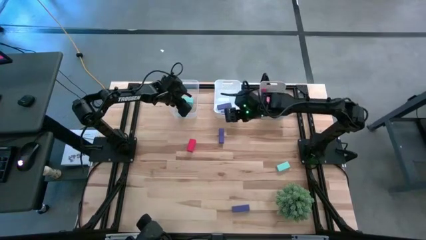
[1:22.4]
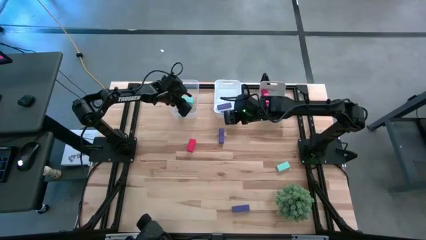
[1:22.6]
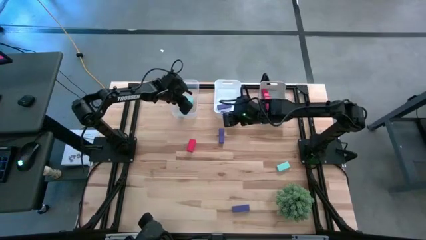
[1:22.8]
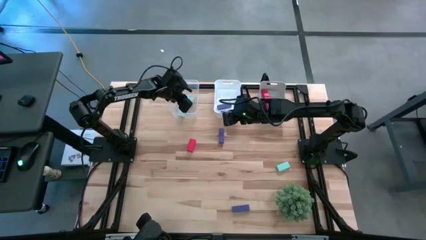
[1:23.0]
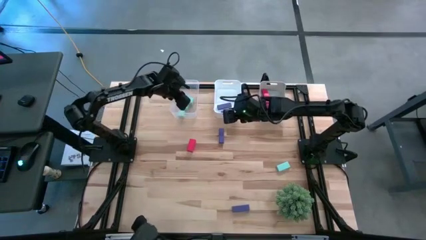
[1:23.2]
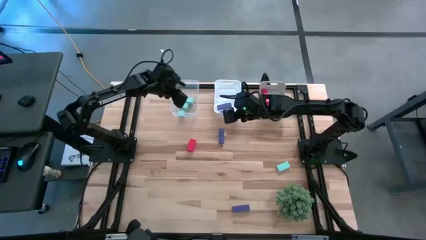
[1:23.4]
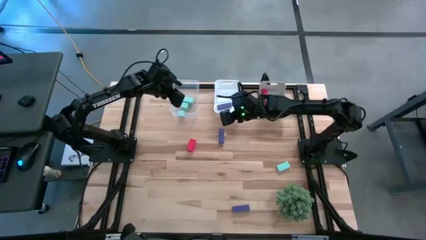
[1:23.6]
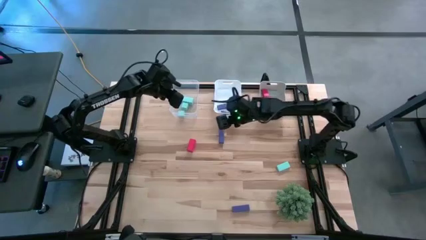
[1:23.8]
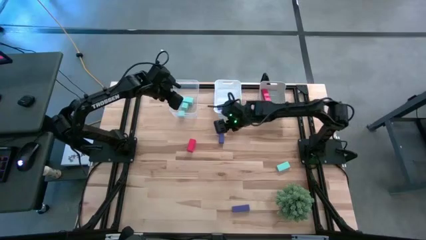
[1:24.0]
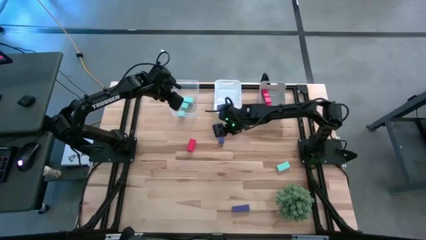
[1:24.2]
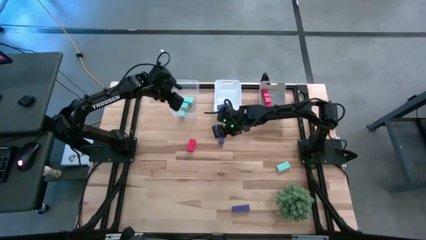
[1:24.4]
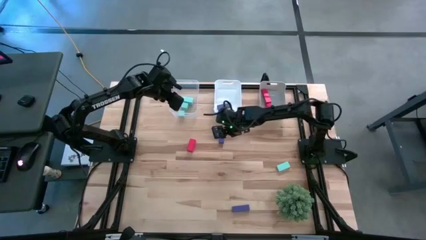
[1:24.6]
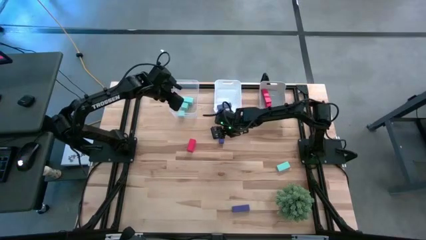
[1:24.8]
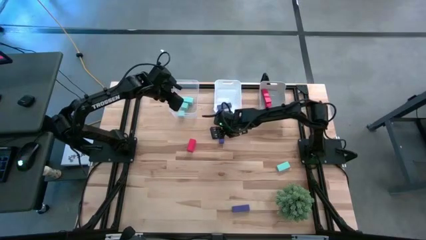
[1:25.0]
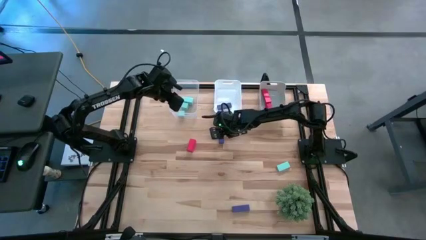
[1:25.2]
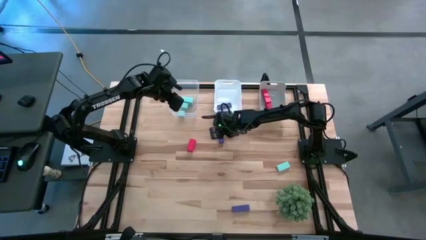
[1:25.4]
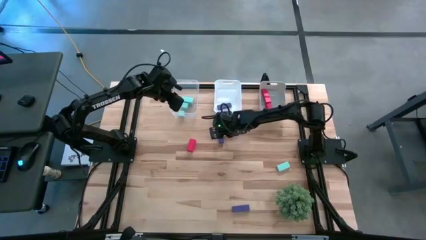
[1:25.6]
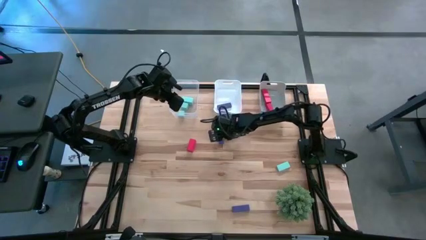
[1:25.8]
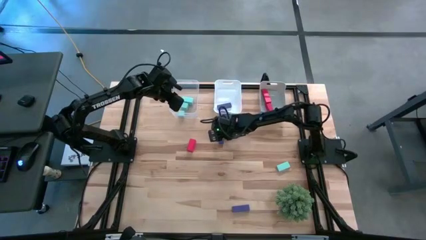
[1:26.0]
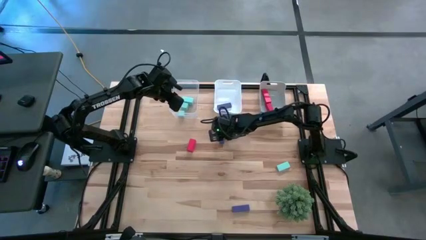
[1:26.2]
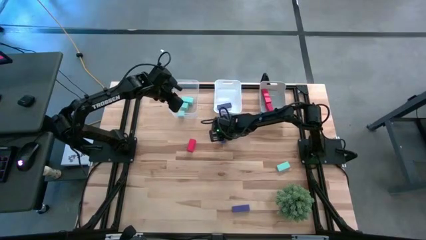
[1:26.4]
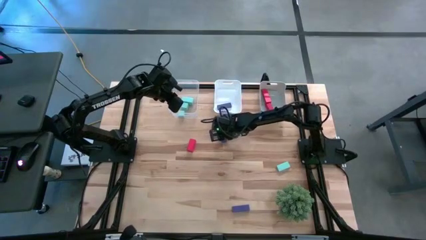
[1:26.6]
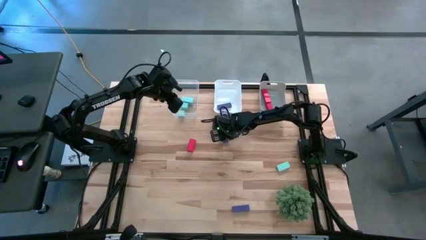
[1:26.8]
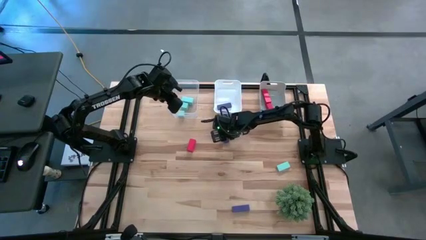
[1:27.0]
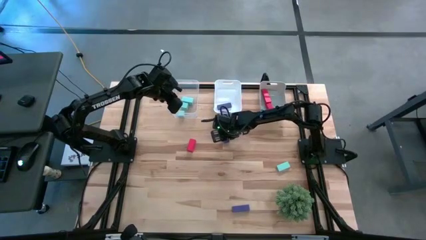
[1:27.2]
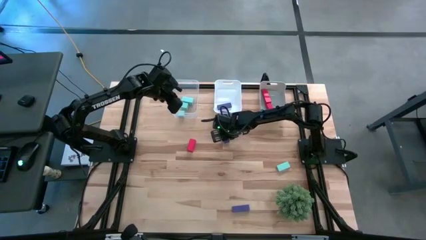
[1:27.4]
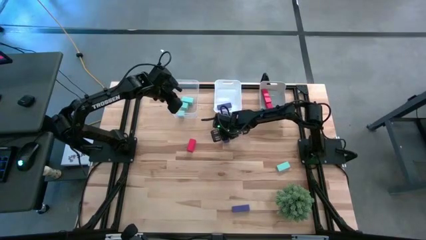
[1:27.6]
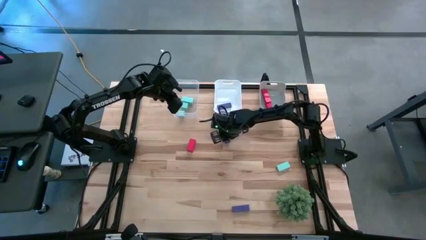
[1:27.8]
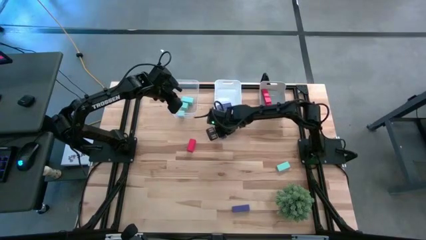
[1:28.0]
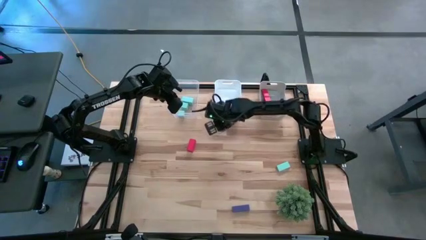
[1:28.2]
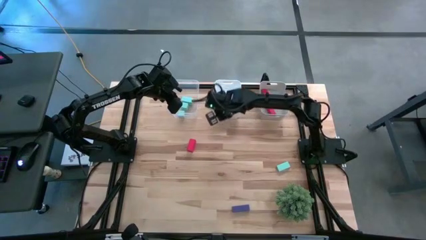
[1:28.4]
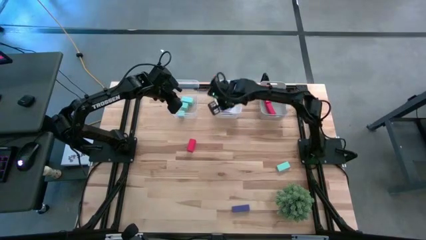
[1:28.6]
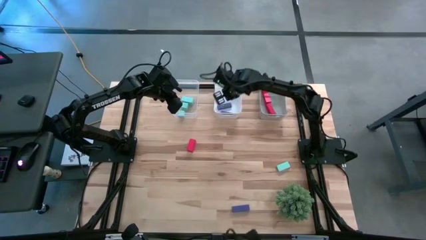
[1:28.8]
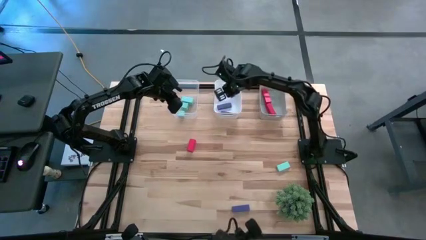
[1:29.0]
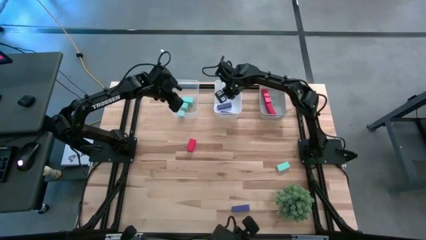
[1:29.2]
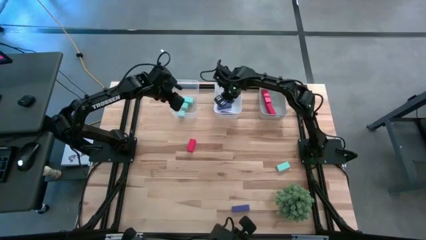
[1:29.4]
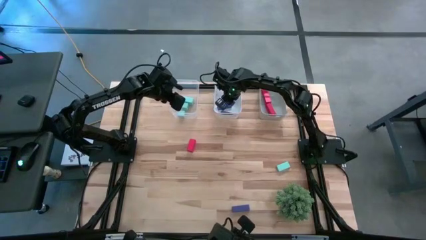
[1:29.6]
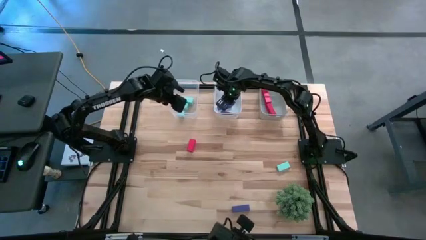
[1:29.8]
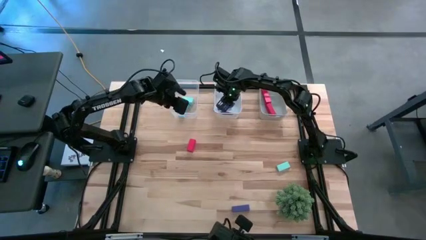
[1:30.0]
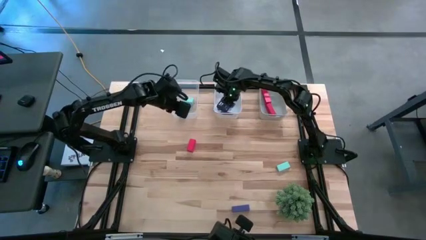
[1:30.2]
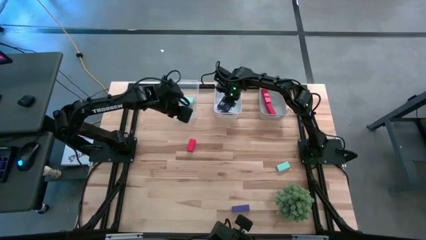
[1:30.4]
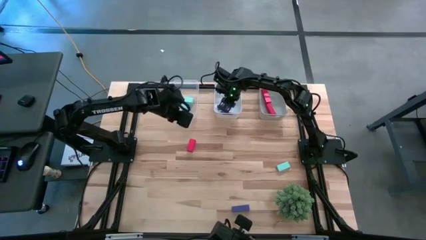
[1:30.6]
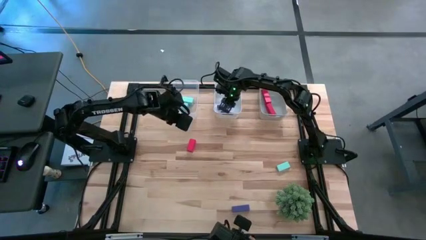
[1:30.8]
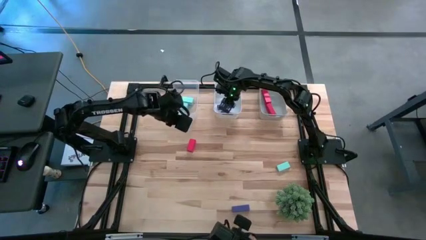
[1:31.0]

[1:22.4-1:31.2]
Task: Sort & place blocks by color
Put the violet block into the white bin

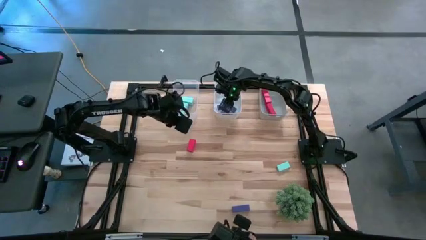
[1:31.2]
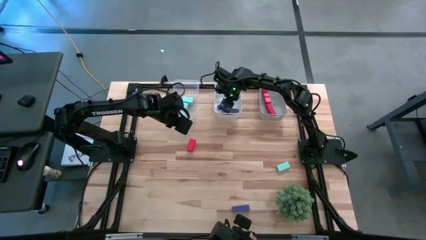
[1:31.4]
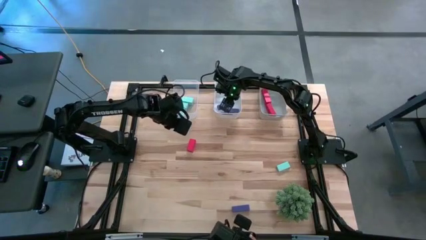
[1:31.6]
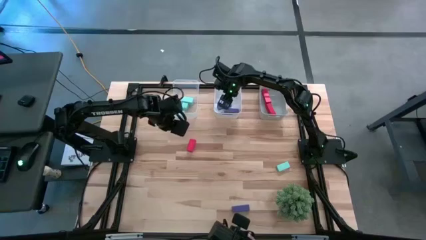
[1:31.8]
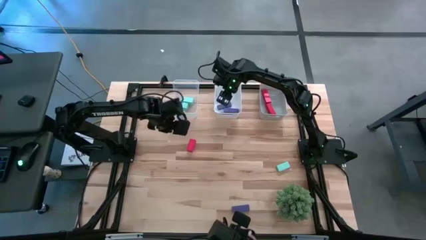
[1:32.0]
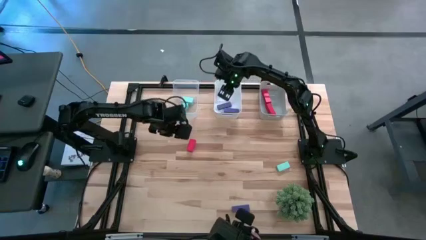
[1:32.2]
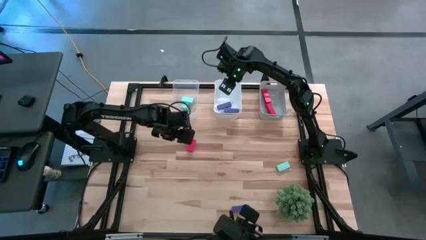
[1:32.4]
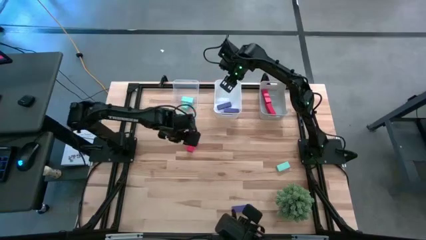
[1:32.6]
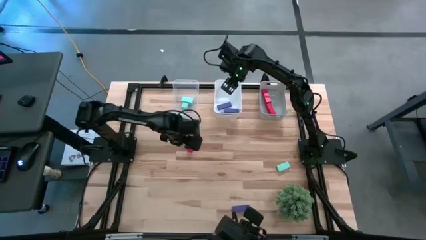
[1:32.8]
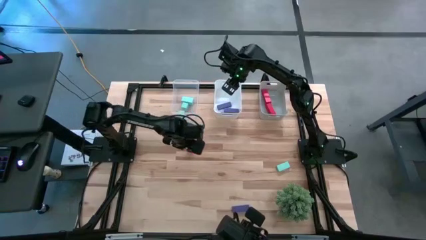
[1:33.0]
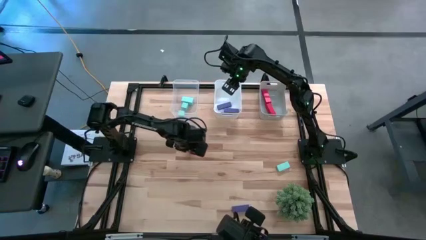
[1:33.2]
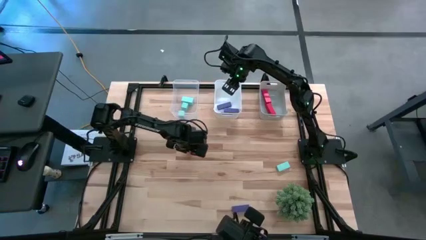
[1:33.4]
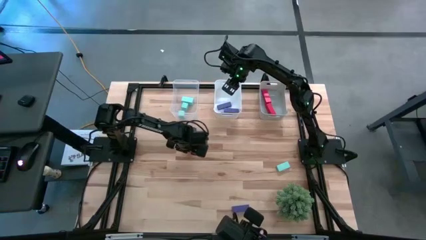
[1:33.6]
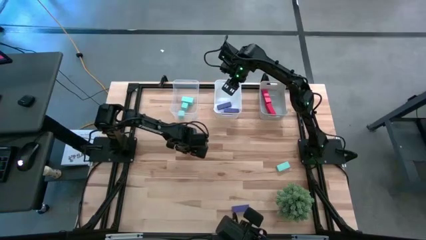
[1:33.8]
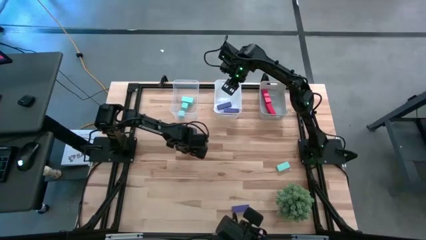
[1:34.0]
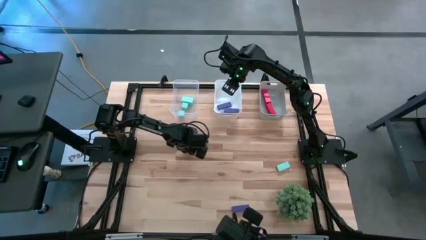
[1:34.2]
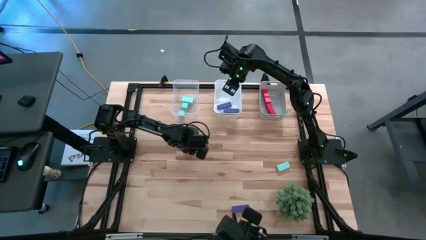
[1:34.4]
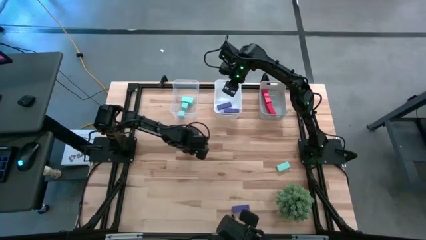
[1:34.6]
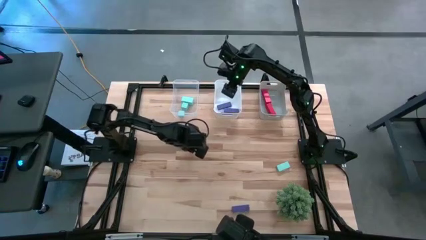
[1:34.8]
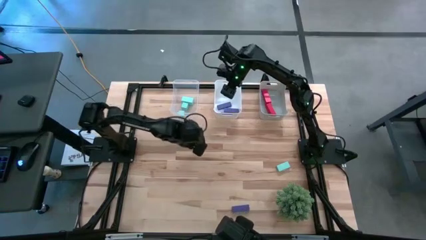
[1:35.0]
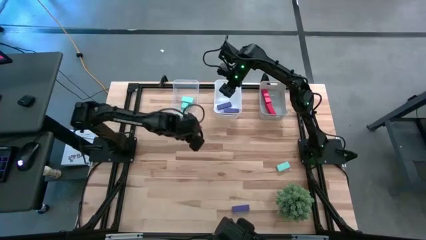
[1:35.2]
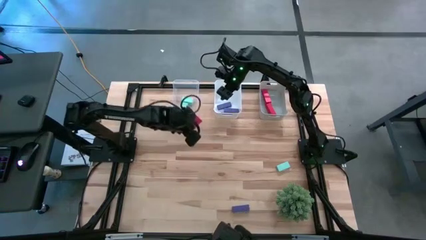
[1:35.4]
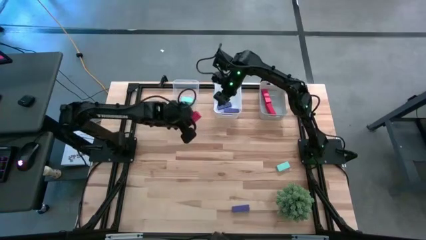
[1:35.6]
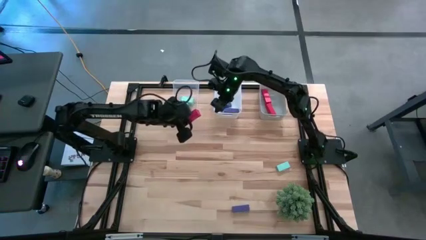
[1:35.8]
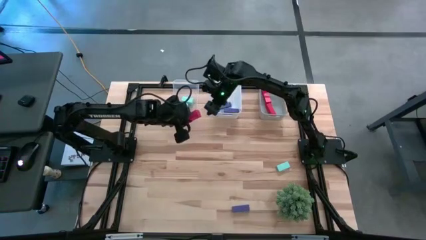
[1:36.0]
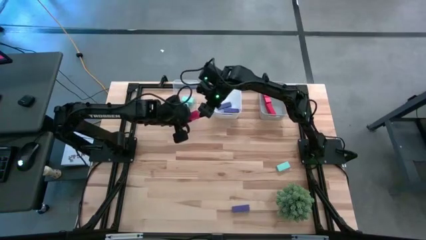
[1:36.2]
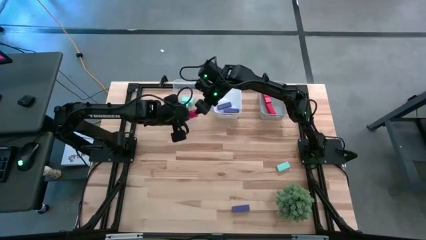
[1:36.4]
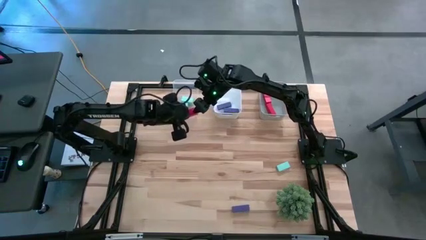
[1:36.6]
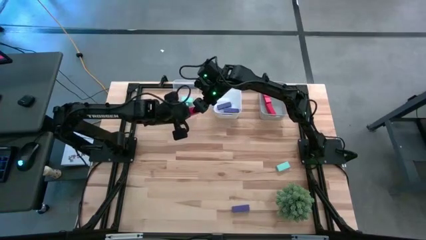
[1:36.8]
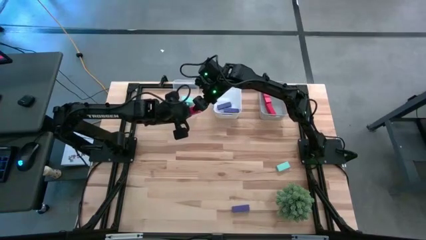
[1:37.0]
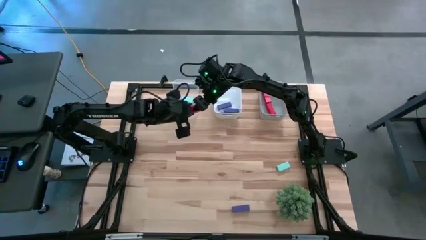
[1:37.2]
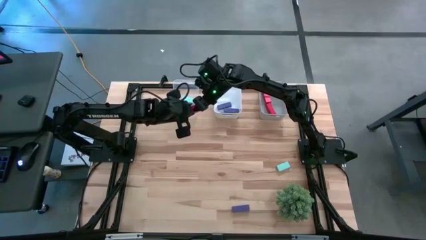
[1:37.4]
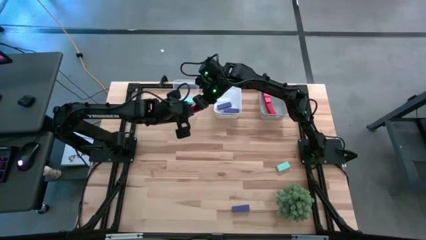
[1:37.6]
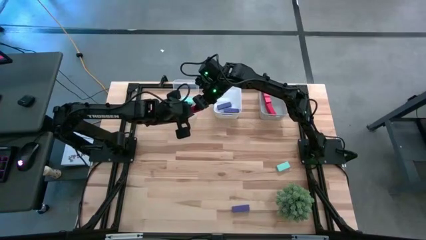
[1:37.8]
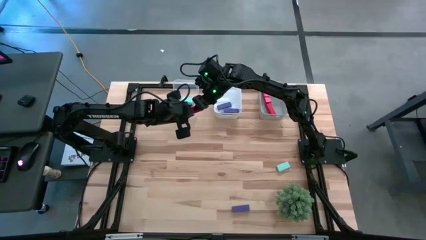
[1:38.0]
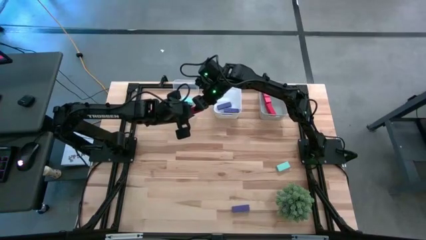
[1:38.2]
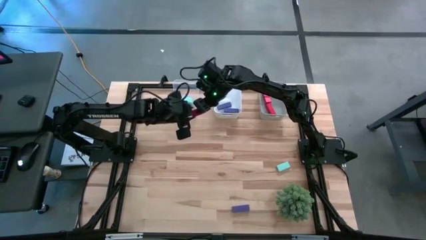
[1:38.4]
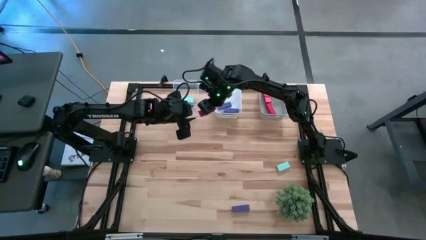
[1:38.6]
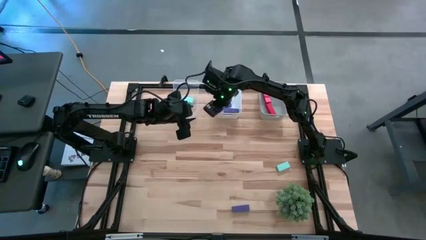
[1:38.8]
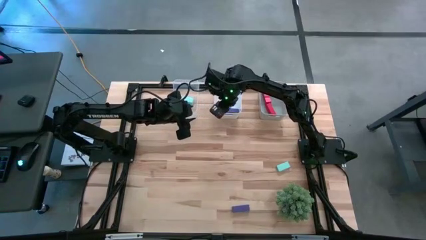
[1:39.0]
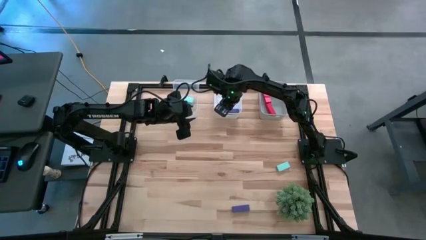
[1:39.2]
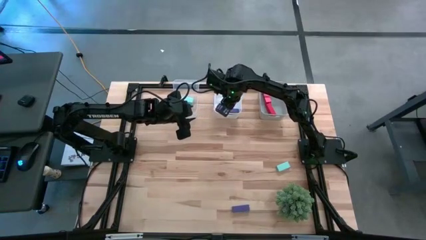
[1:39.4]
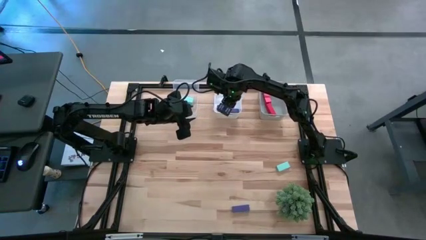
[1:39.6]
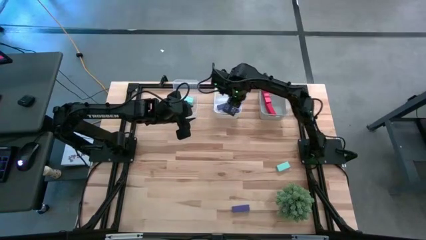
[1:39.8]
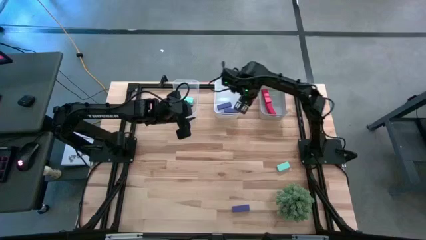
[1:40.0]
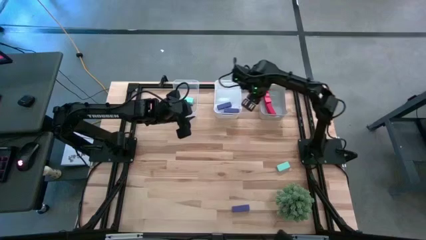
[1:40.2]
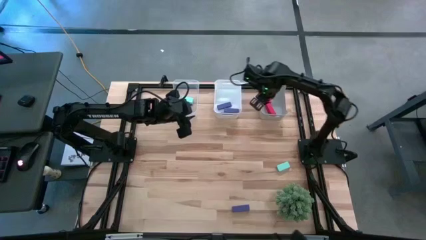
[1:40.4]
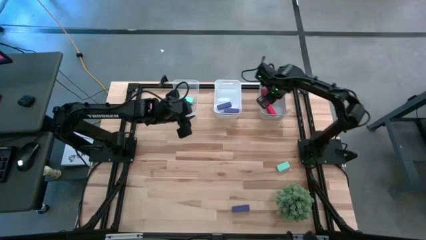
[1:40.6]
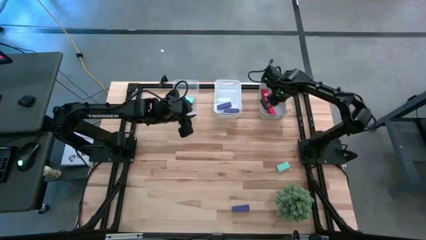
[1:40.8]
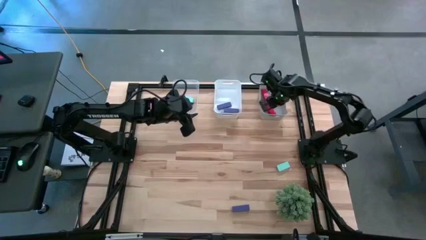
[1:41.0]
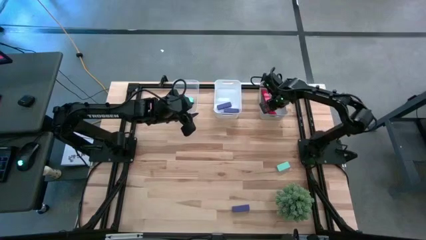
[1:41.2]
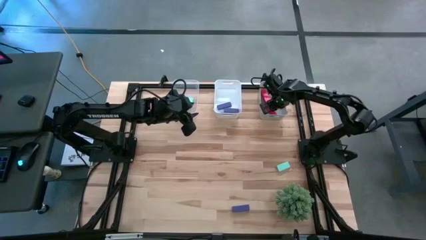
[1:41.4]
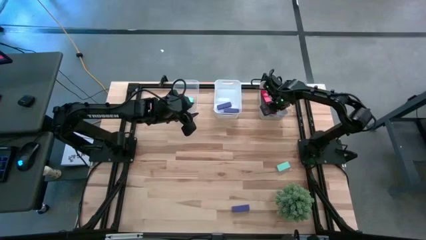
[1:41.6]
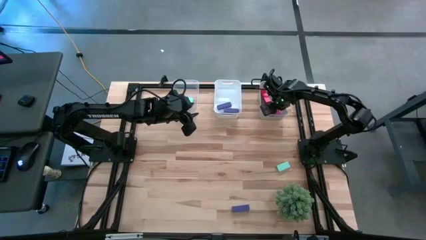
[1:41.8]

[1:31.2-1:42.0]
Put the red block into the gray bin
